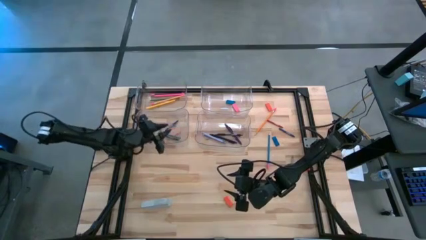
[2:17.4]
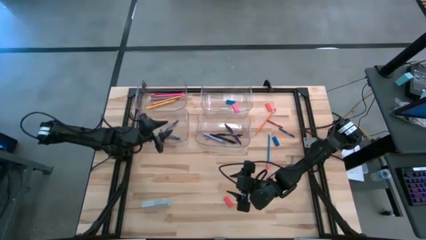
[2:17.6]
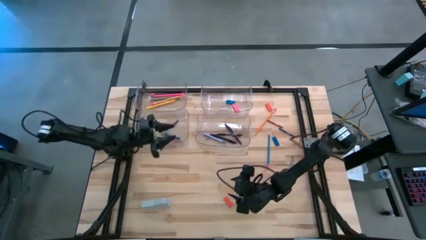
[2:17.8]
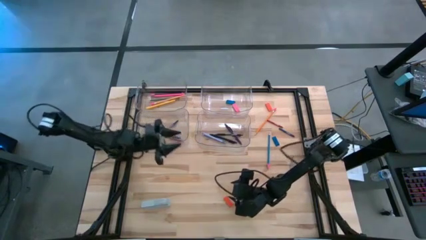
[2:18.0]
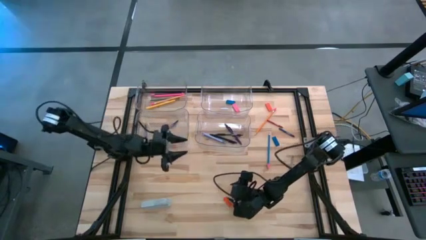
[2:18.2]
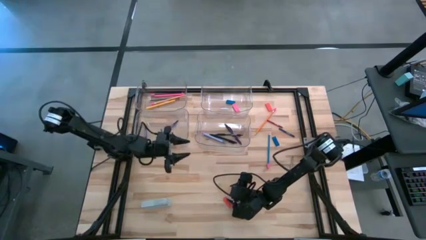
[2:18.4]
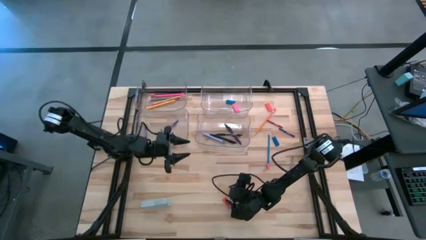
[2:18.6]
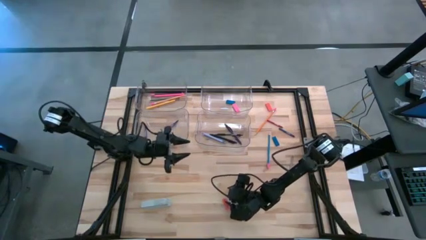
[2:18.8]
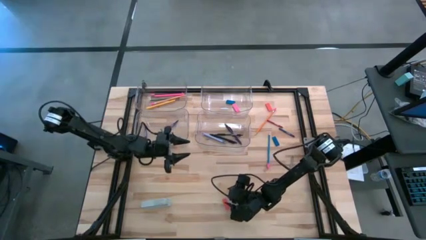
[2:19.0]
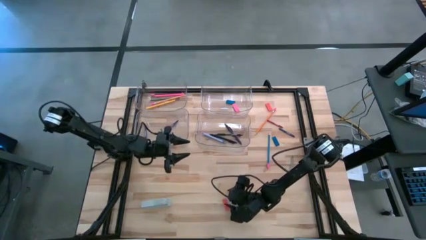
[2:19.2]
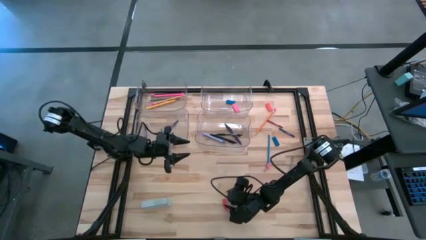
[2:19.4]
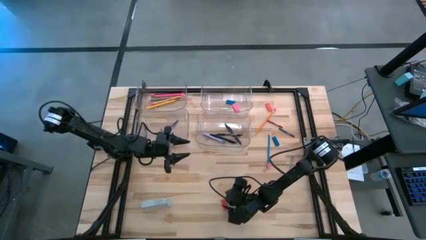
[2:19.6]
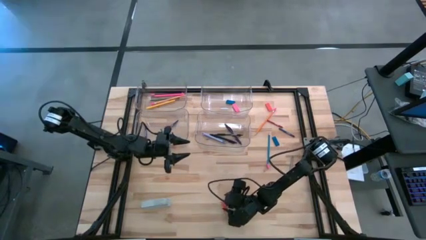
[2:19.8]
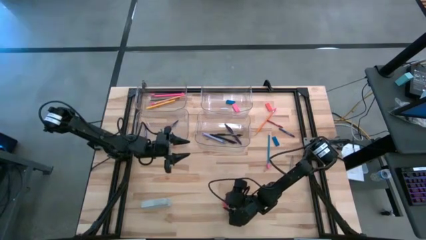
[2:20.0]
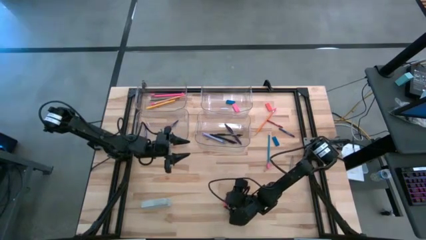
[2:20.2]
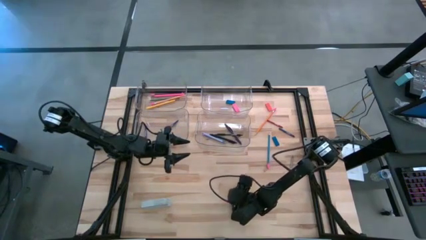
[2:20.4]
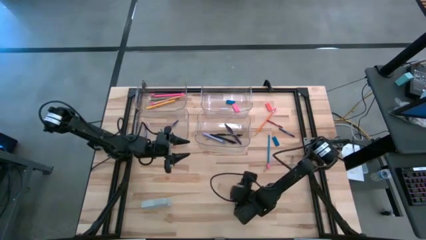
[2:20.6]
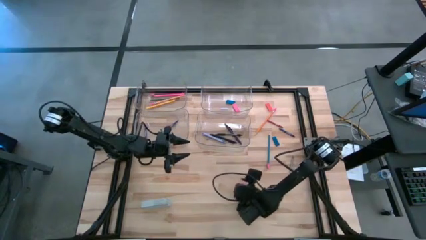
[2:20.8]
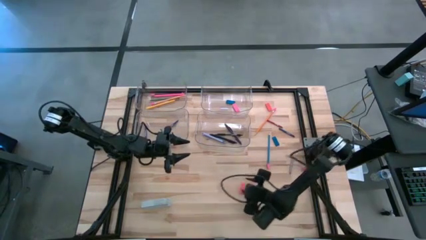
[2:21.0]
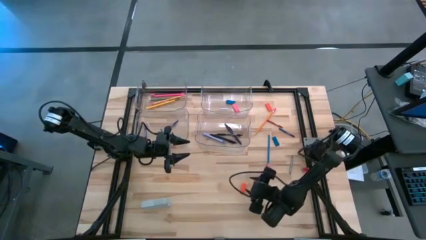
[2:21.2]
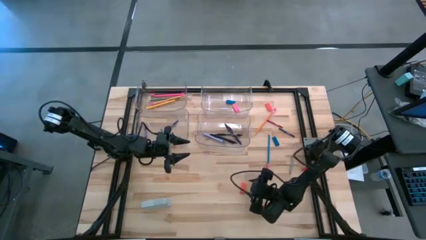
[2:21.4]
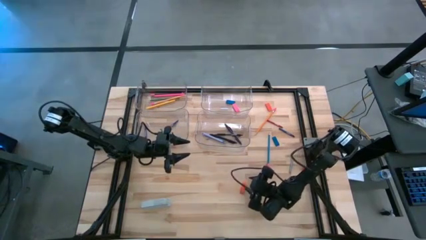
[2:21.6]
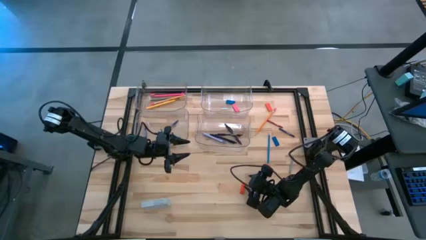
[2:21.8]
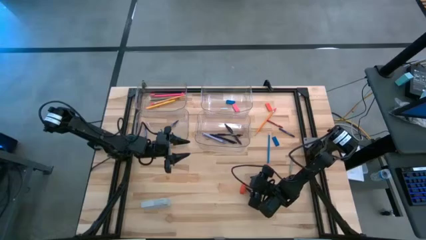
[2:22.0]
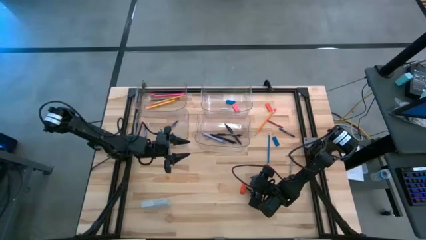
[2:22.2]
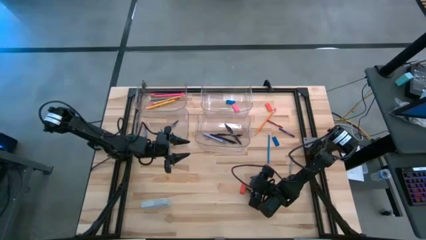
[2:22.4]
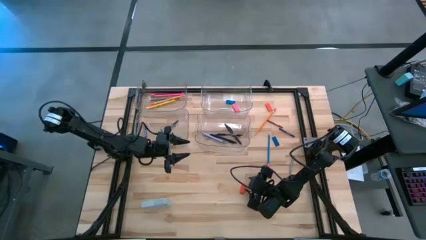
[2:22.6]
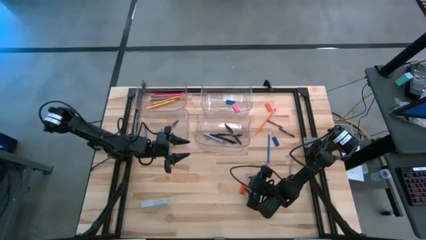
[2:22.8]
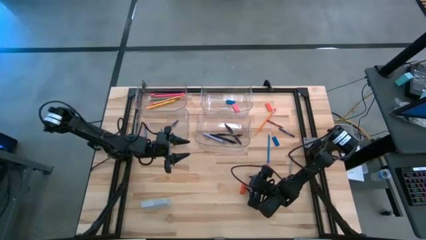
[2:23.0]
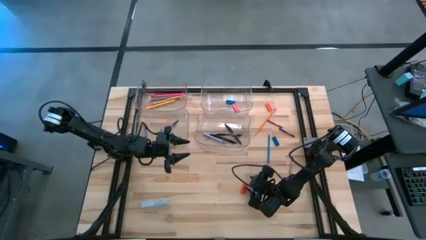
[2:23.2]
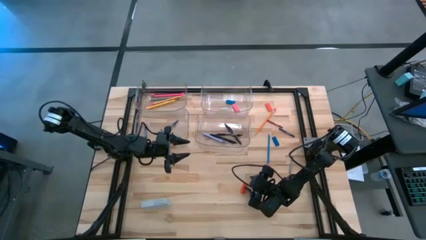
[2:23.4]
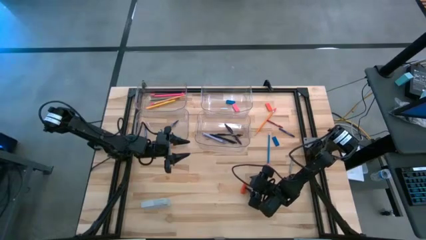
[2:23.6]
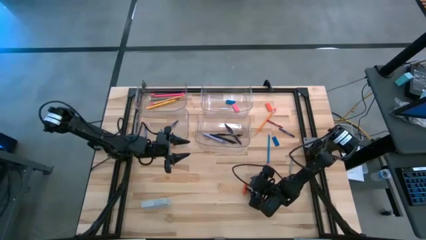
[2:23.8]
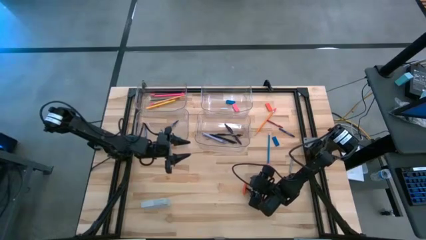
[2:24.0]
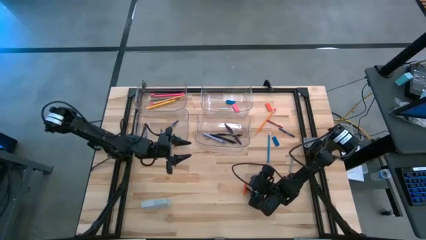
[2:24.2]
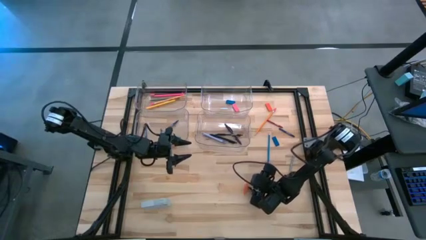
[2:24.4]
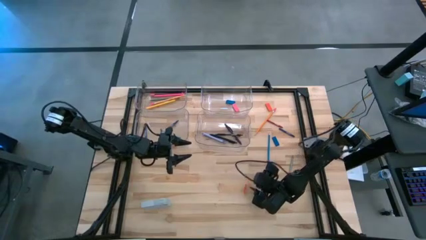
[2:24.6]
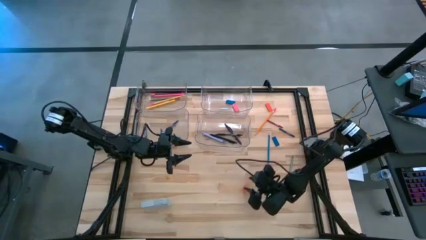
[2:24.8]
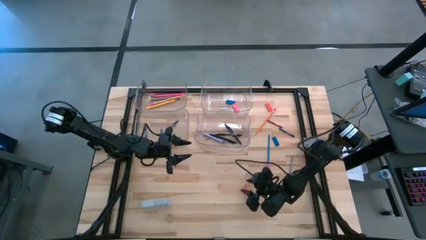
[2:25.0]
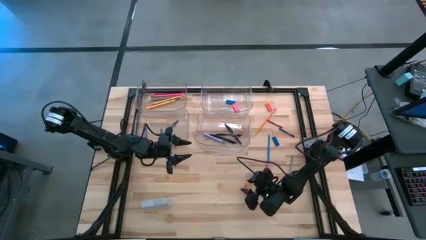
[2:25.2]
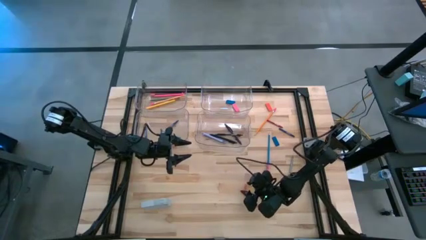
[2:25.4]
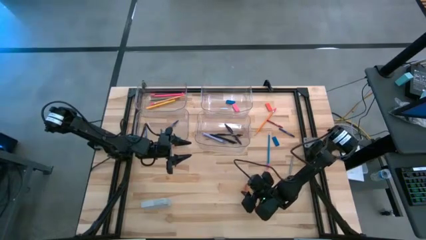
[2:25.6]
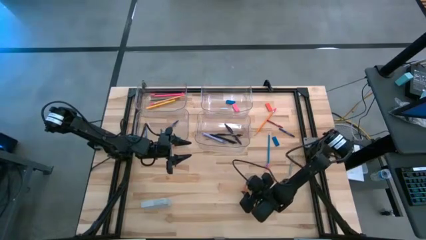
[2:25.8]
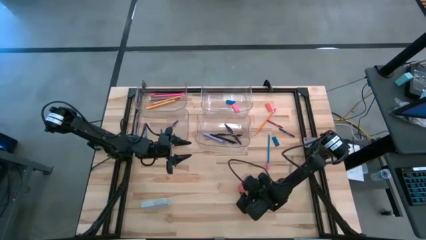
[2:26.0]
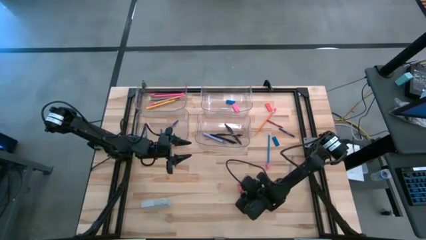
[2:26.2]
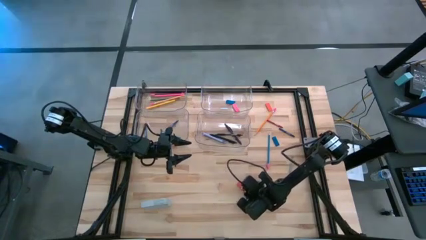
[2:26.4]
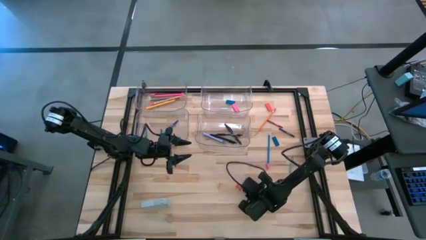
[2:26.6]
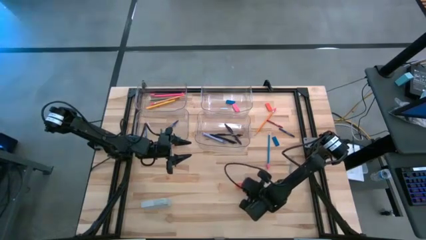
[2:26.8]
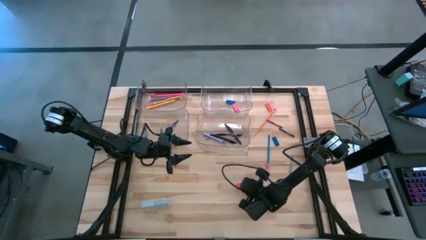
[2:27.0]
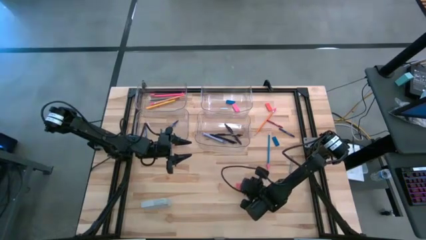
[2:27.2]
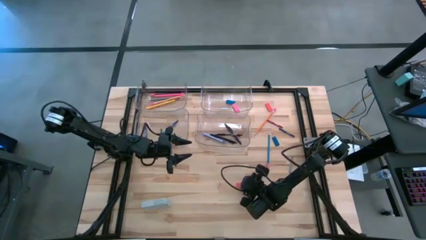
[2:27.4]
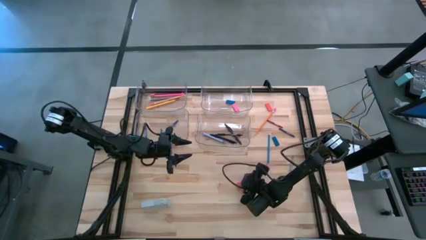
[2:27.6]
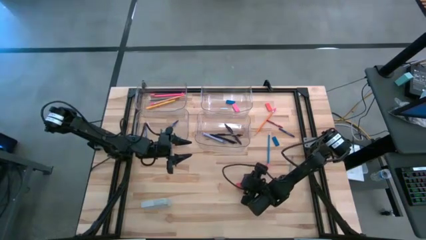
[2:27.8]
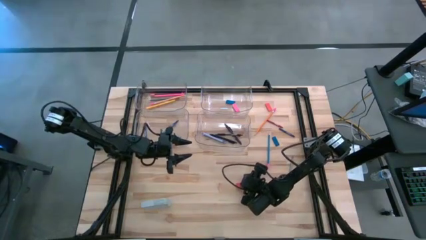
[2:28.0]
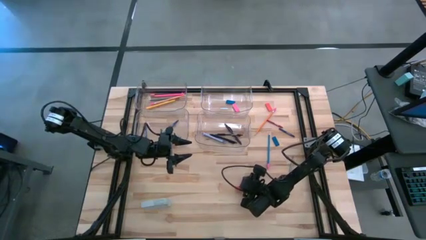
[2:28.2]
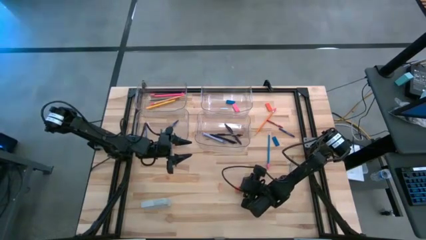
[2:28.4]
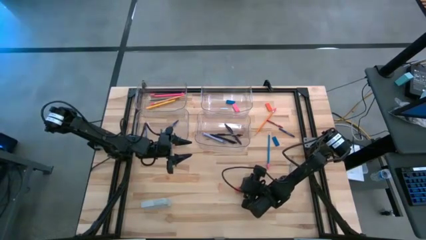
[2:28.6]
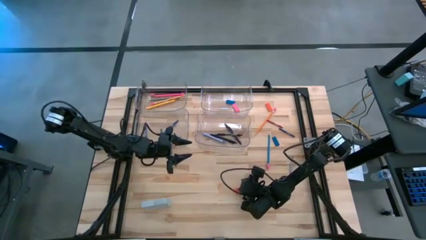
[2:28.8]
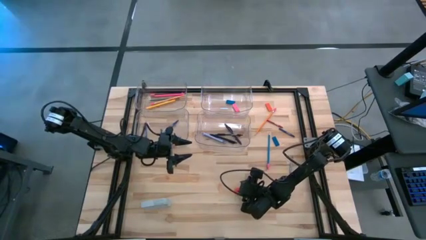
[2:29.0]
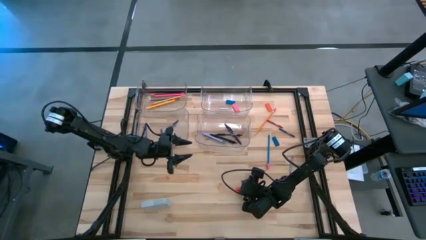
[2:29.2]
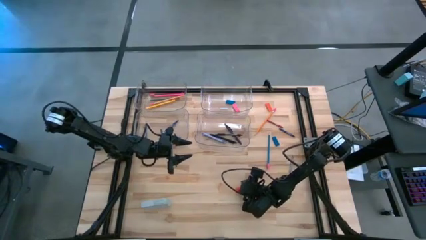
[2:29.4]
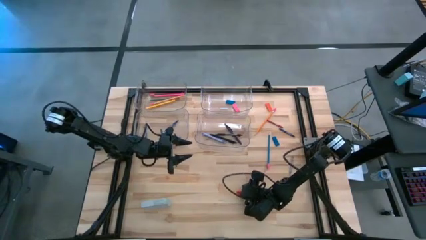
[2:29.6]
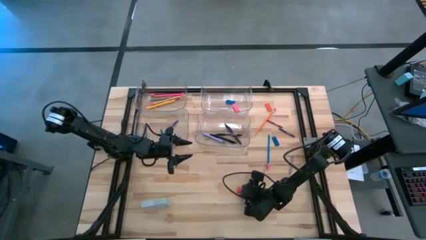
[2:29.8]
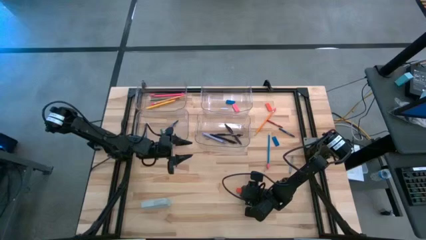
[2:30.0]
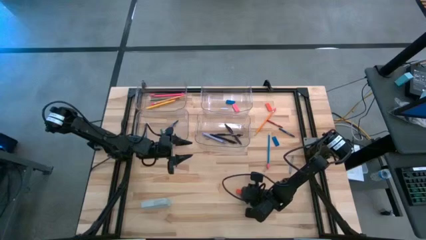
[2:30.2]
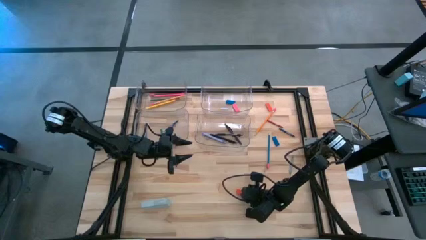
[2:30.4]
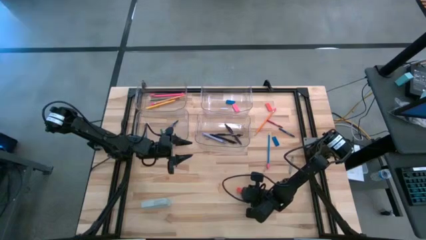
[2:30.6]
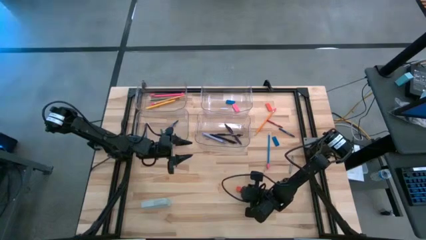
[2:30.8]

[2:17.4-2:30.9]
Task: Sort crayons/erasers/pens/pencils in bins
Put the bottom orange eraser into the top right transparent bin

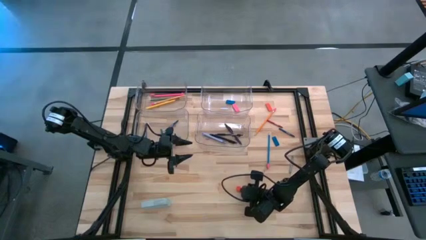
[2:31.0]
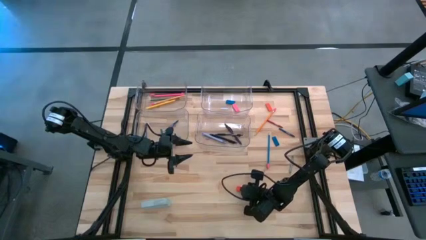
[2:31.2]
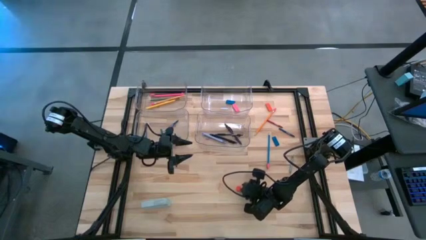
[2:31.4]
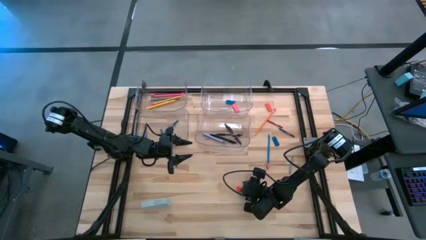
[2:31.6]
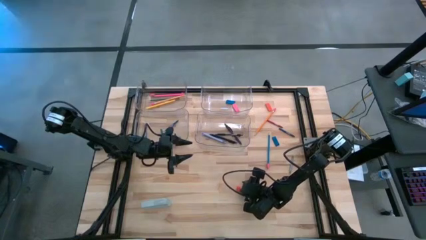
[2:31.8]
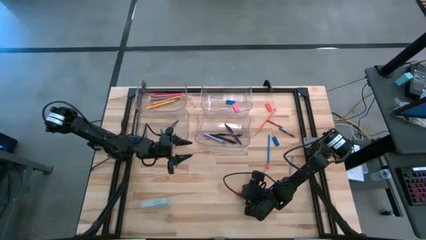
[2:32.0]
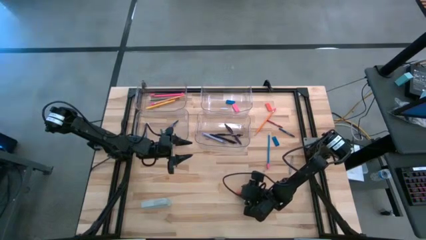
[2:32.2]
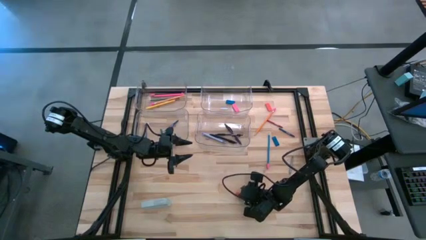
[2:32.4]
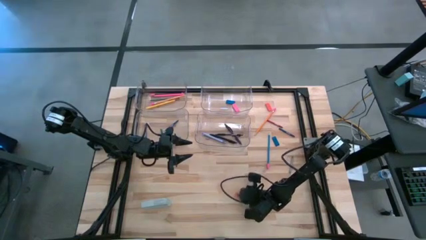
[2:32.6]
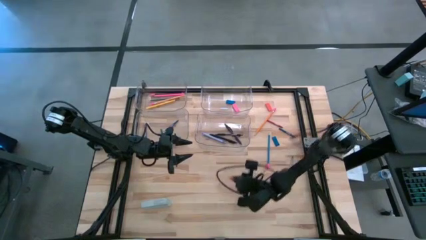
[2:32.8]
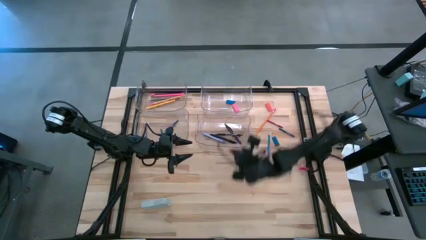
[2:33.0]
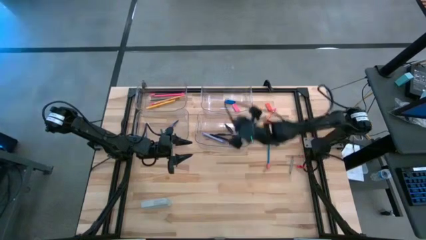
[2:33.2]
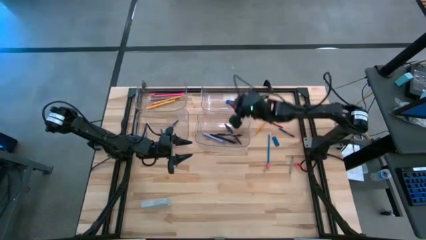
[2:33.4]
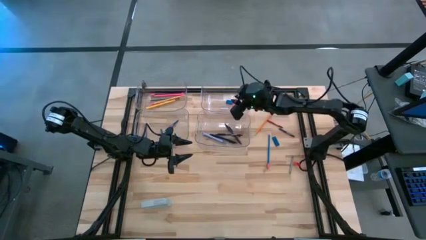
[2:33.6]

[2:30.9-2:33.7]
Put the bottom orange eraser into the top right transparent bin
